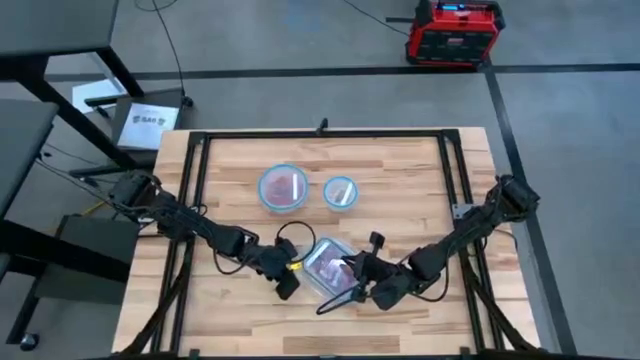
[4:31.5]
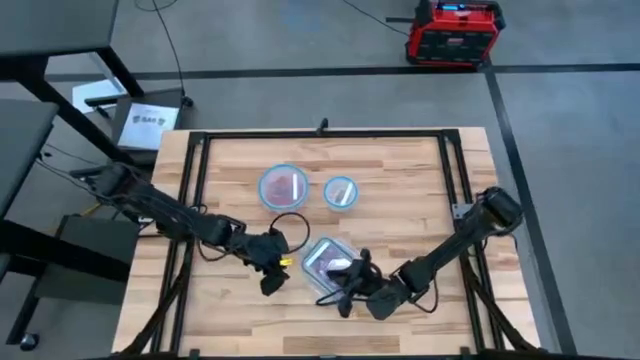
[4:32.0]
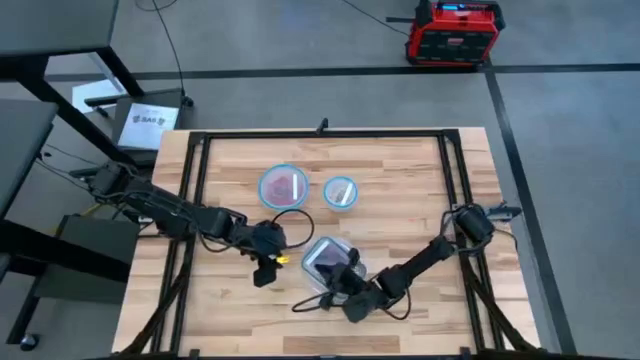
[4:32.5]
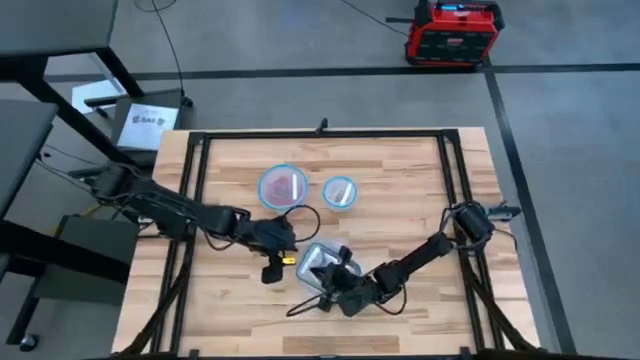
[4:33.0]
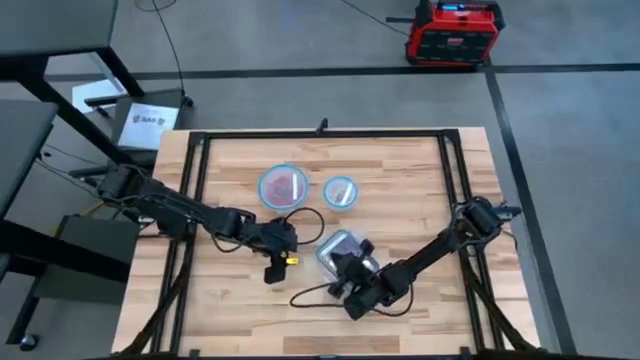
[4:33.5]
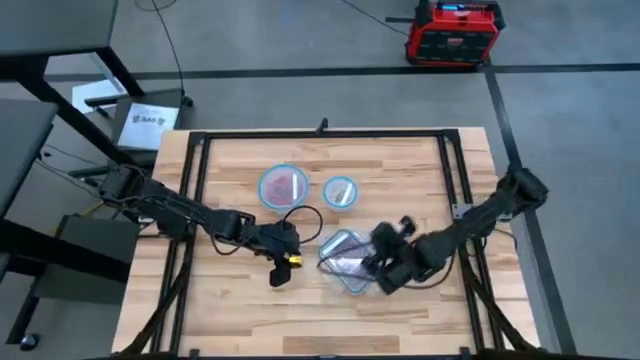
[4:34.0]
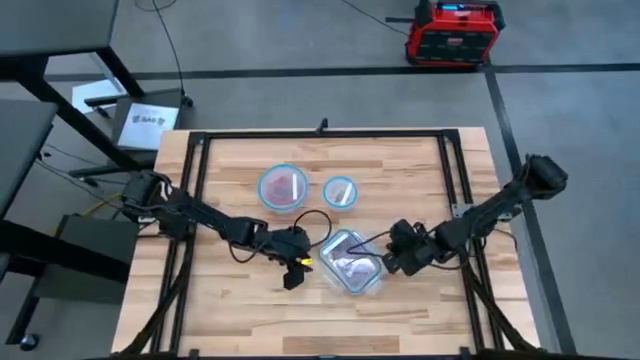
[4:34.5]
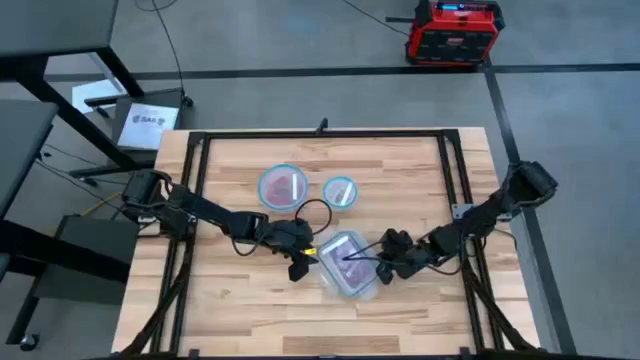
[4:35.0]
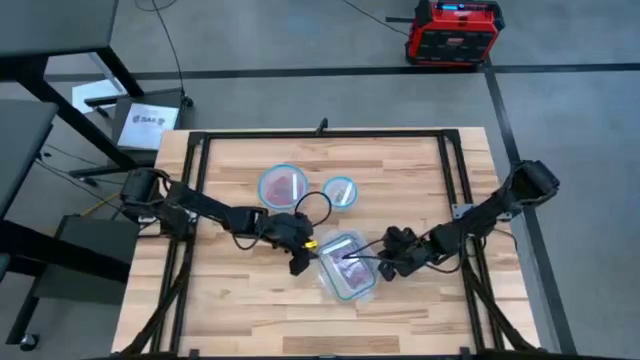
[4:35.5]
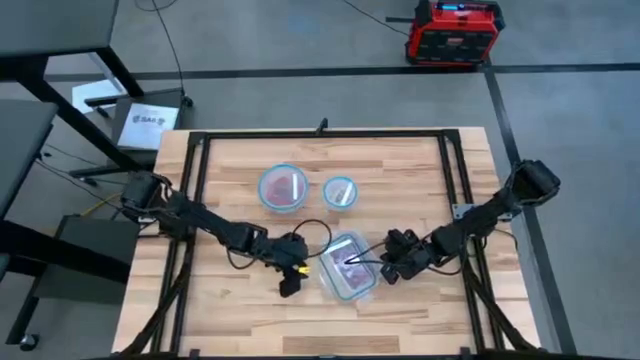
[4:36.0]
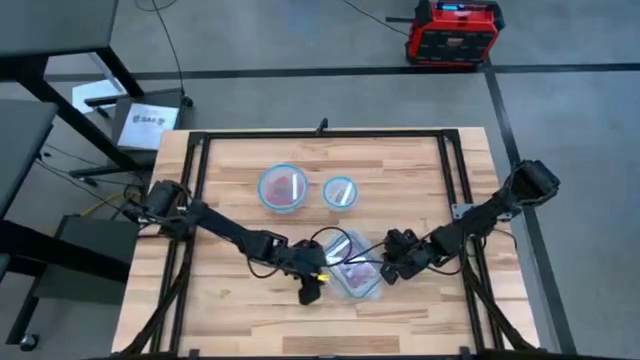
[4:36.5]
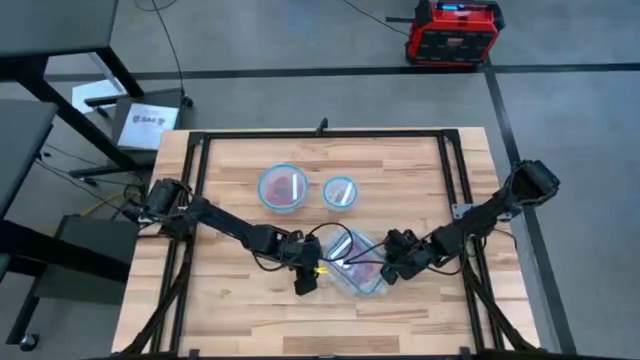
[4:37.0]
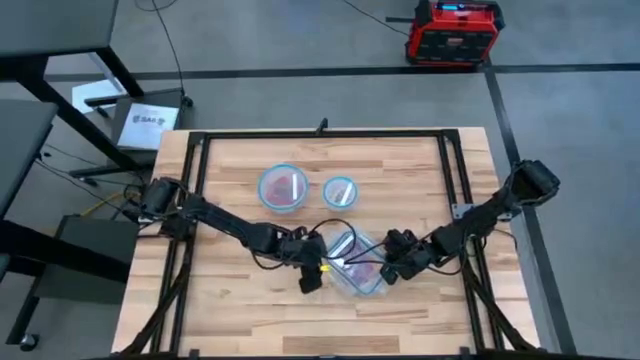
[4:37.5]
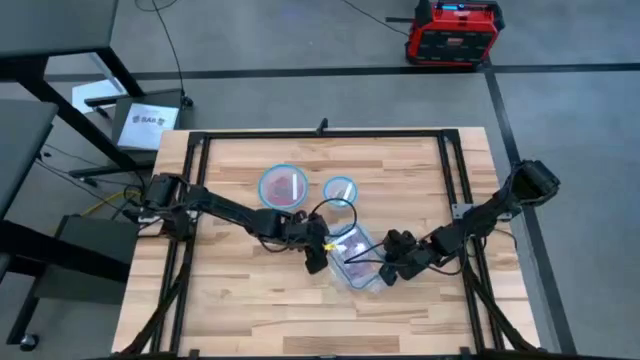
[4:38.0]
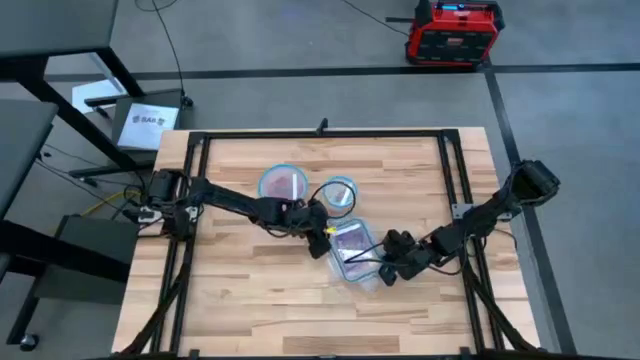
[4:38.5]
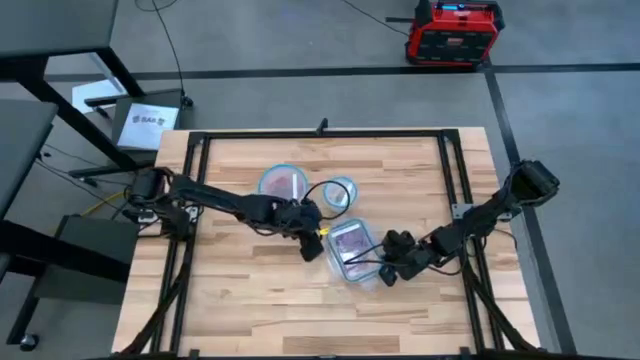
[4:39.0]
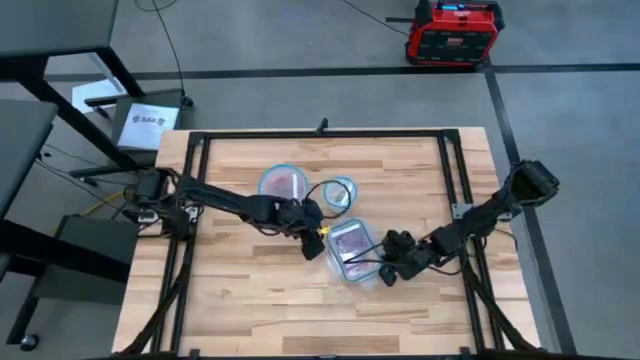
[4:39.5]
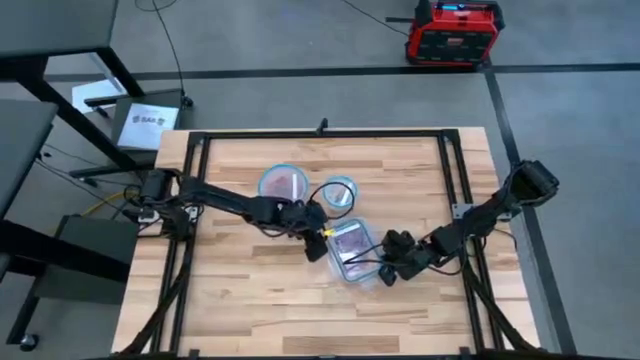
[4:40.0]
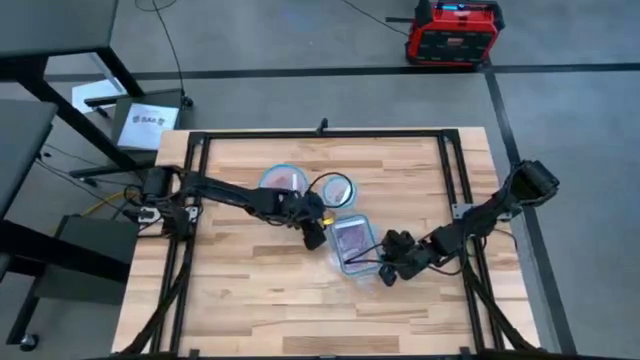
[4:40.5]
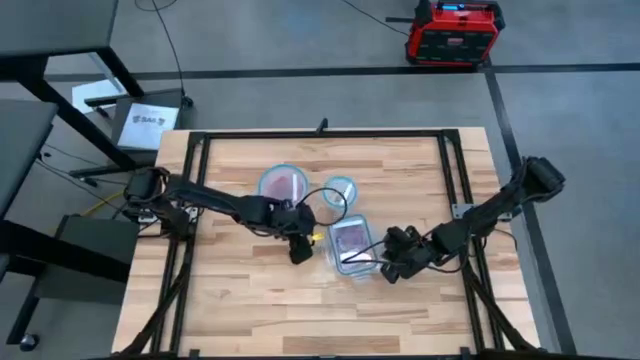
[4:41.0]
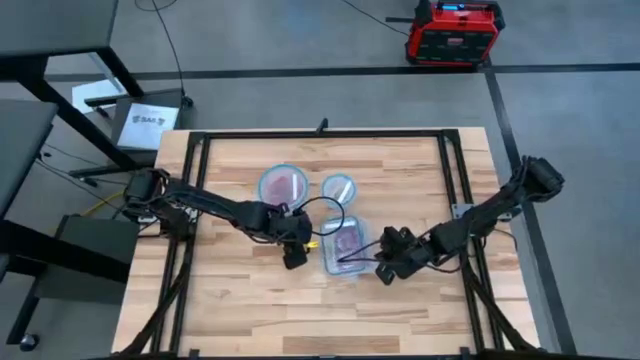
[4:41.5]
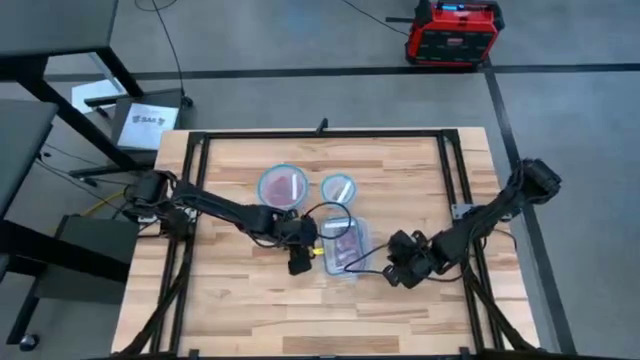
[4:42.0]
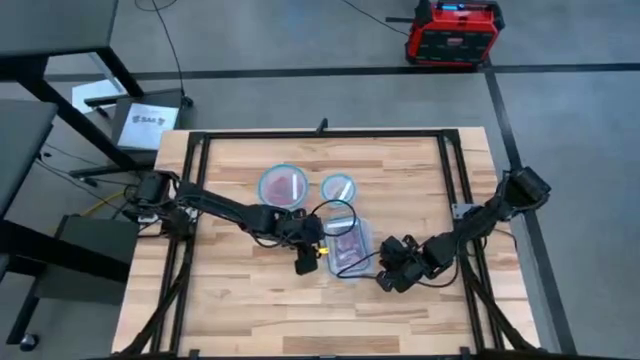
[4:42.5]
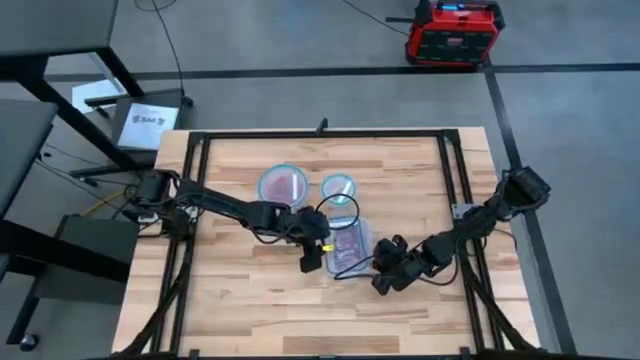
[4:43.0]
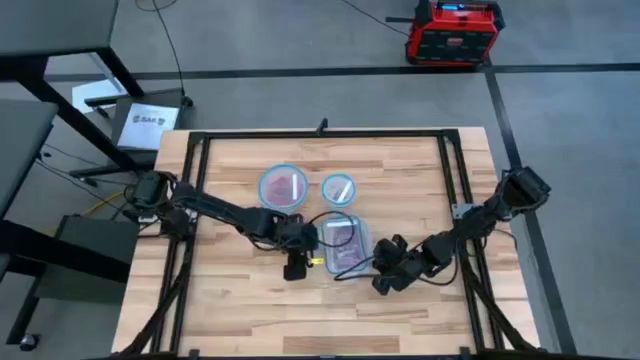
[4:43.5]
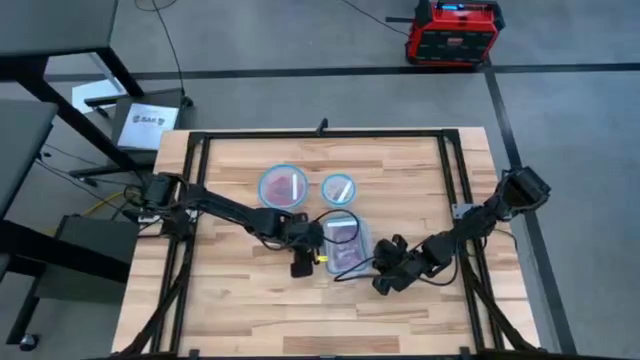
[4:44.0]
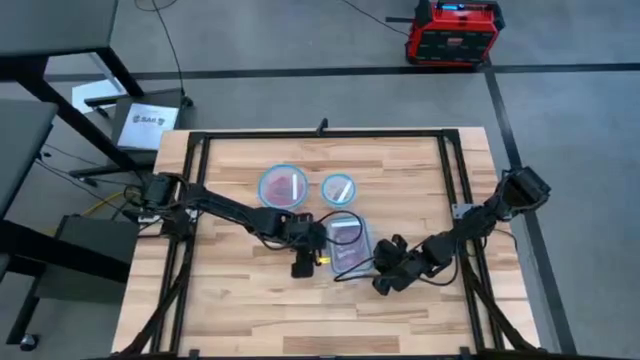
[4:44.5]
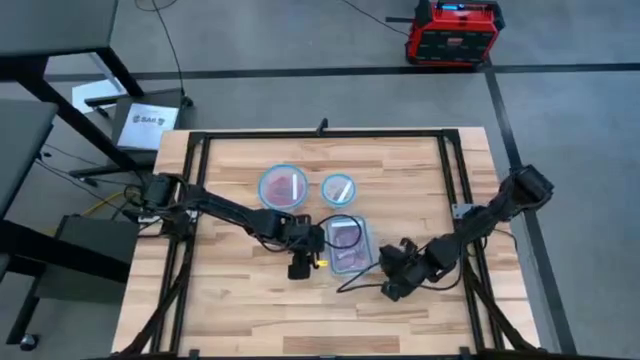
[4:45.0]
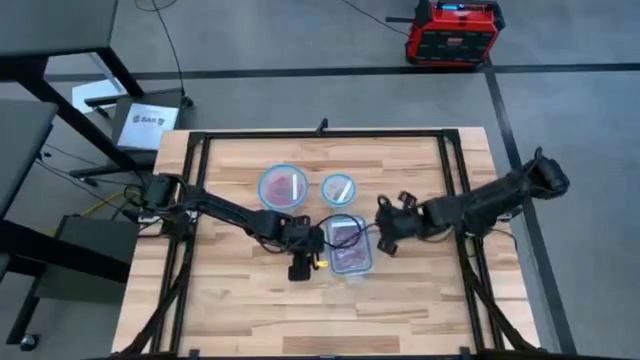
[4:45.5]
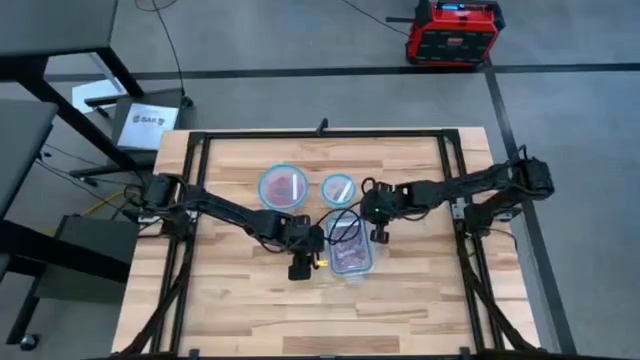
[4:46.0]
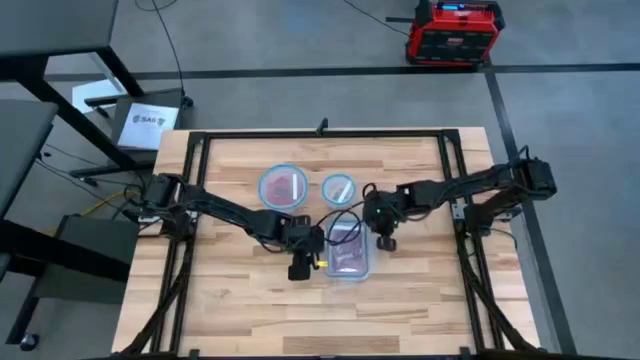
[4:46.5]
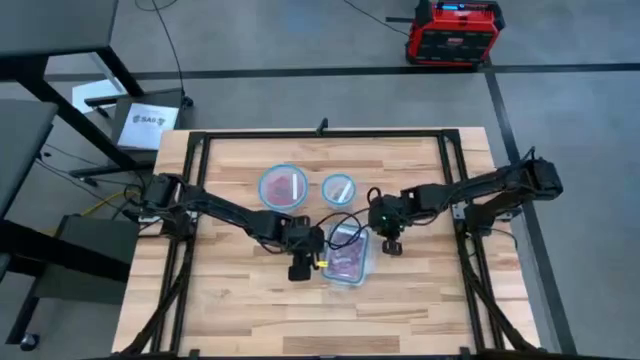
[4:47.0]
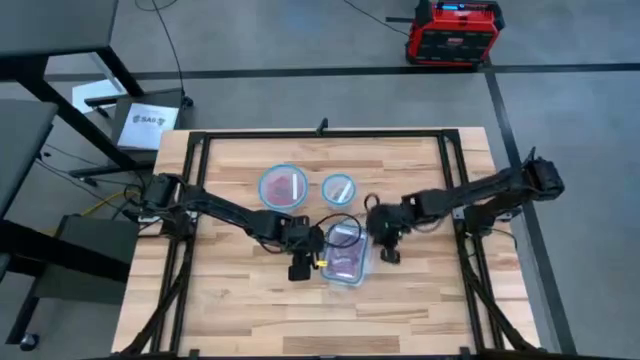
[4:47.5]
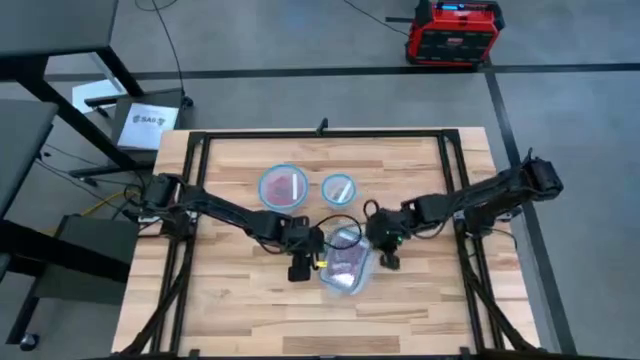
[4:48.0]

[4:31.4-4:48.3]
Task: Sort candy
Close the center transparent bin with the lid

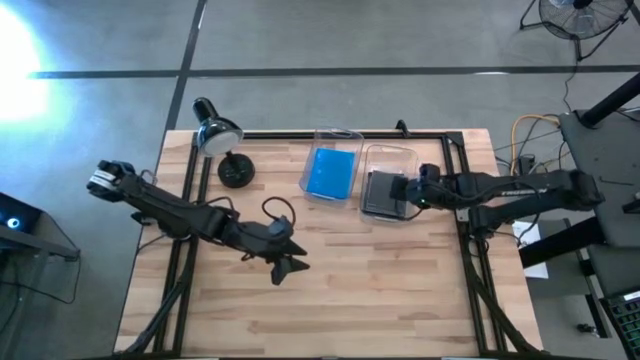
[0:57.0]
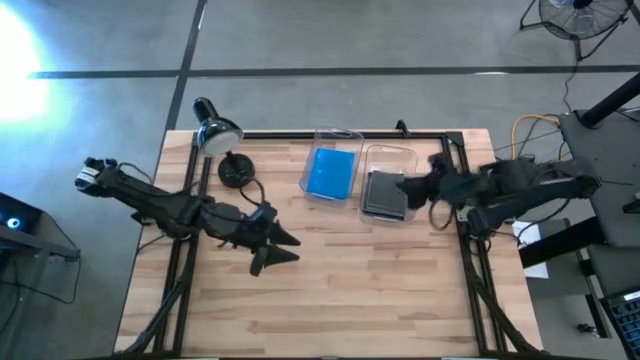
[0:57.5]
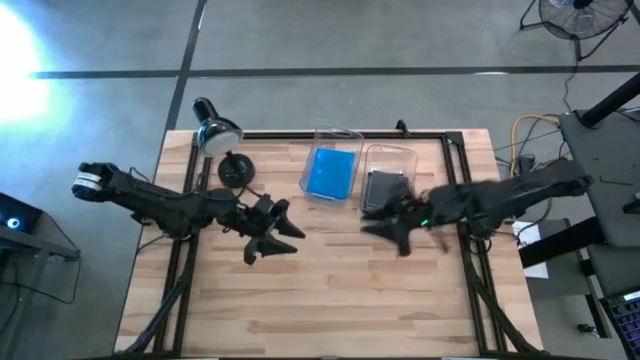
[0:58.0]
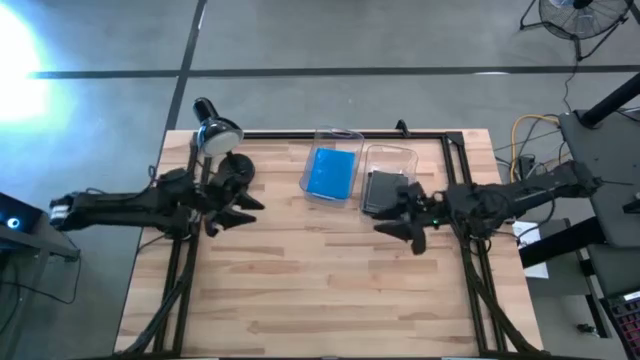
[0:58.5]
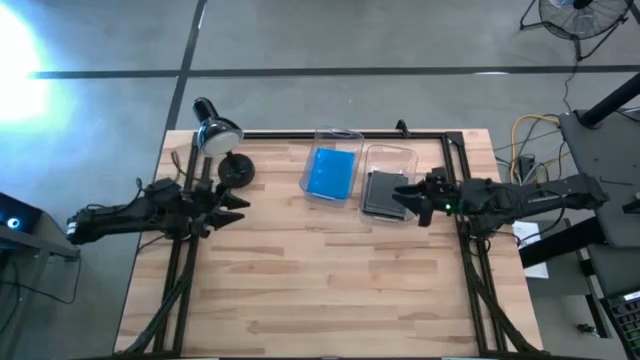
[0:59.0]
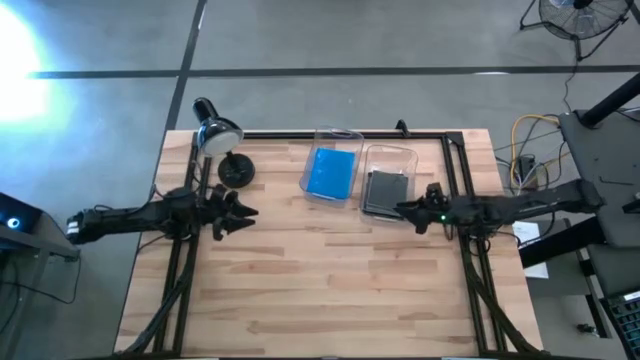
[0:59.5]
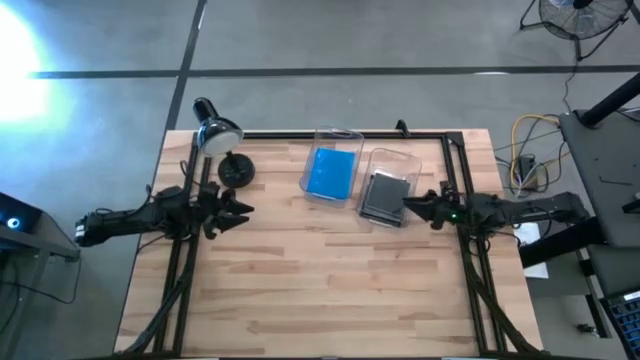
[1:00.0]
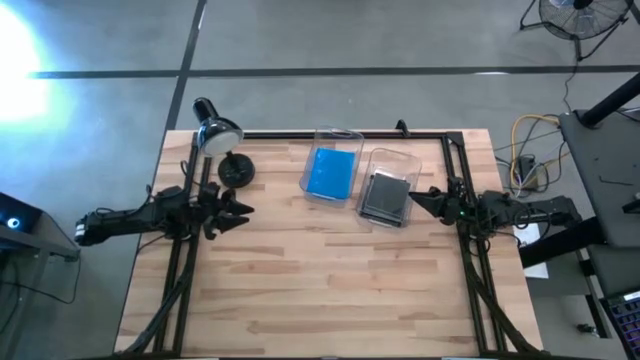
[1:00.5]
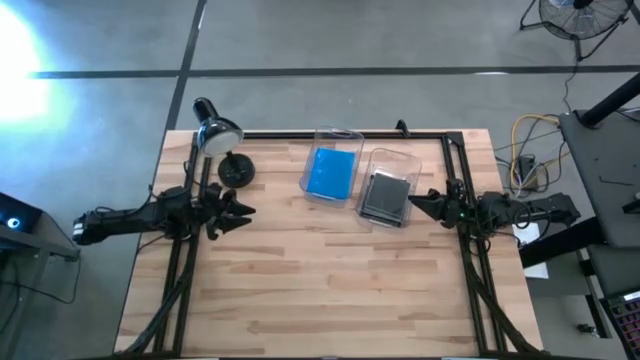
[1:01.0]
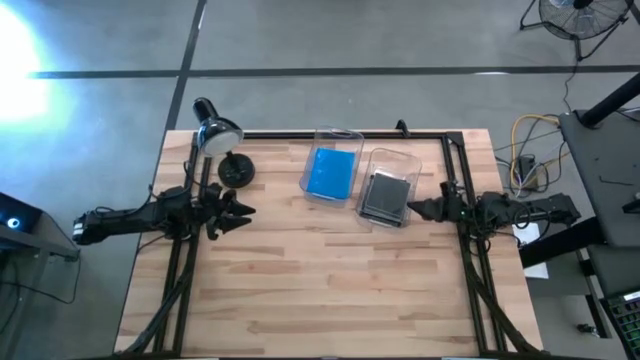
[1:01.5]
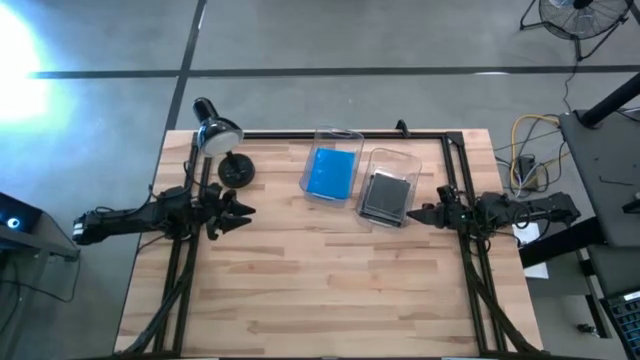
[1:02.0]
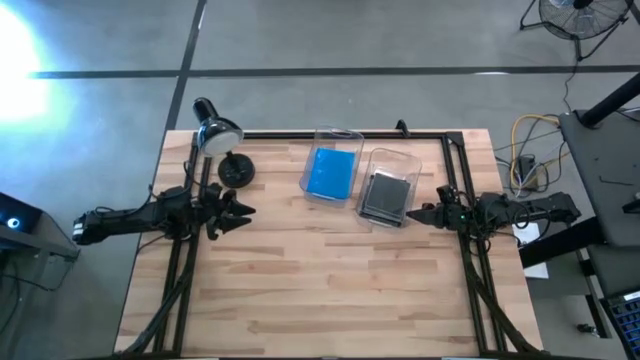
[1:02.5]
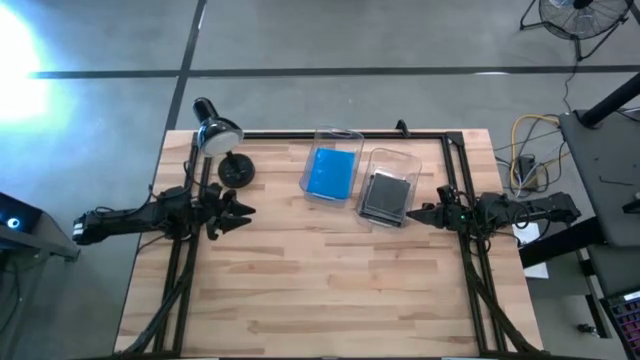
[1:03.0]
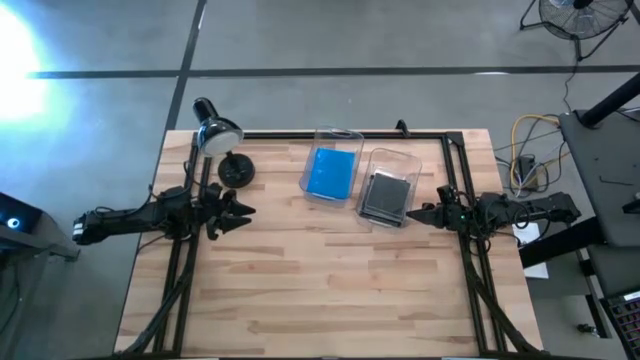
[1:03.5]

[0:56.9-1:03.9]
Task: Pick & place jewel cases by type
Return to Home Position
